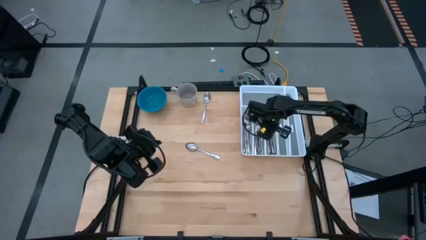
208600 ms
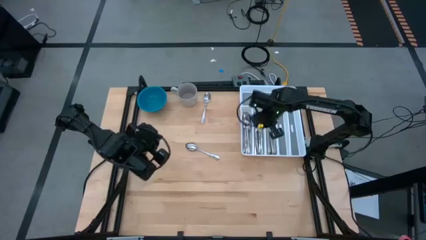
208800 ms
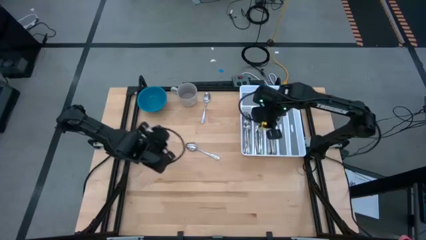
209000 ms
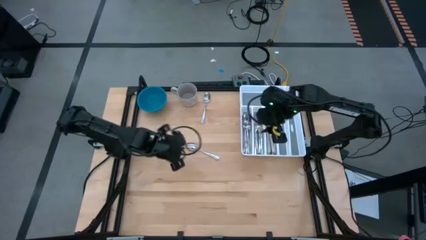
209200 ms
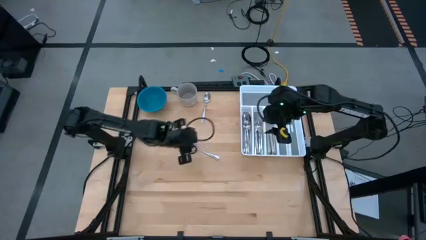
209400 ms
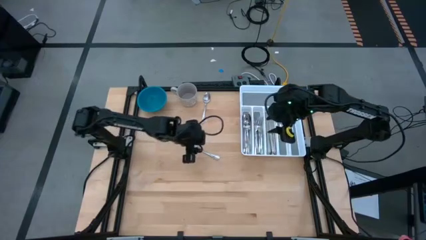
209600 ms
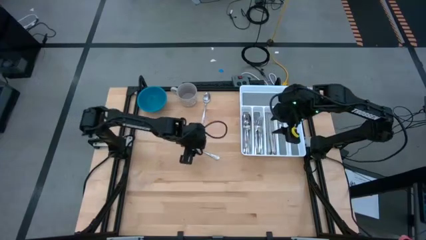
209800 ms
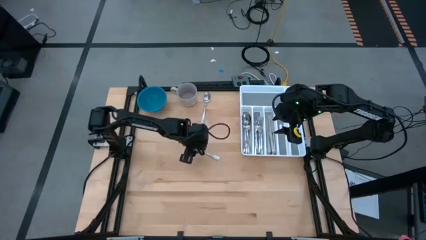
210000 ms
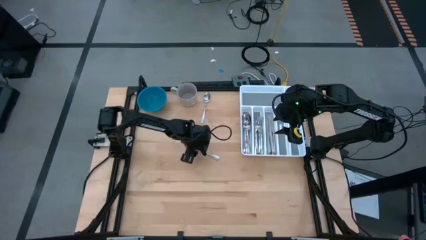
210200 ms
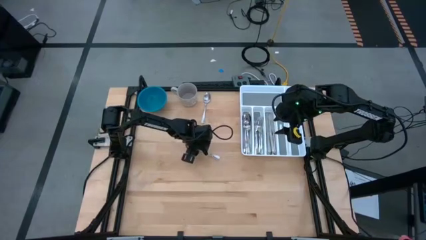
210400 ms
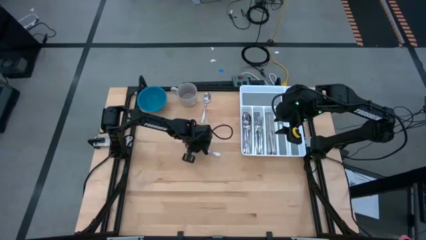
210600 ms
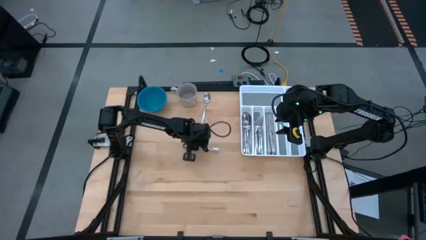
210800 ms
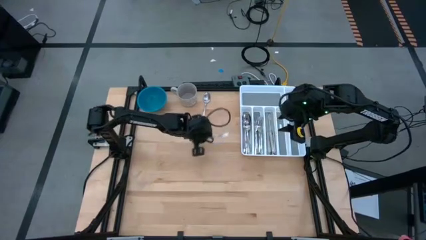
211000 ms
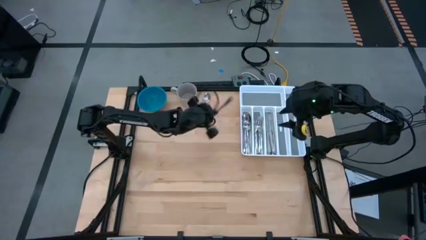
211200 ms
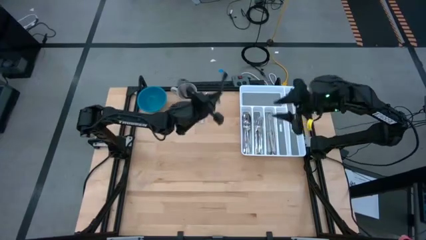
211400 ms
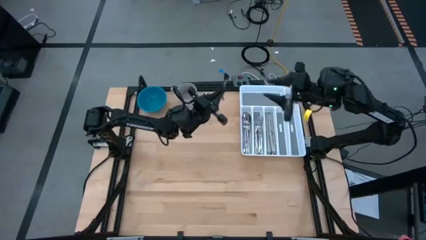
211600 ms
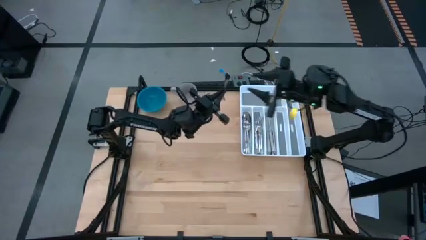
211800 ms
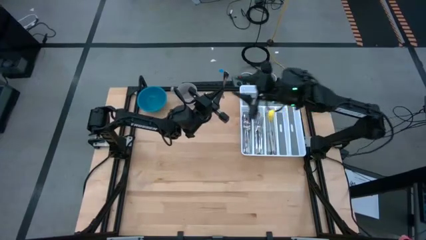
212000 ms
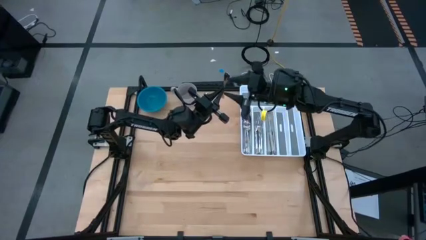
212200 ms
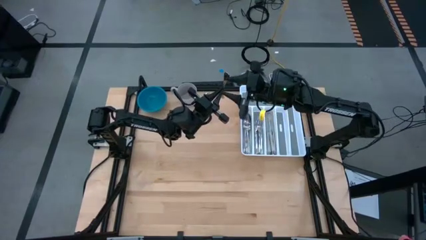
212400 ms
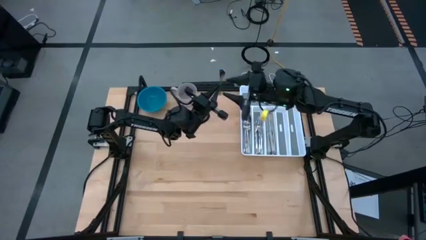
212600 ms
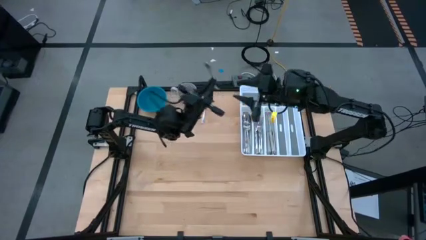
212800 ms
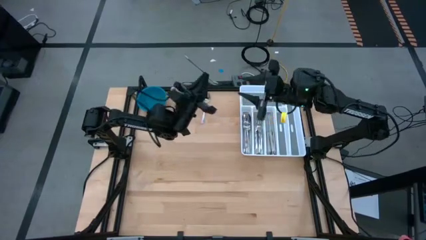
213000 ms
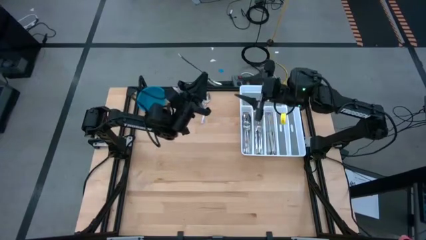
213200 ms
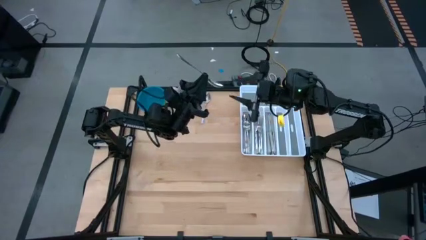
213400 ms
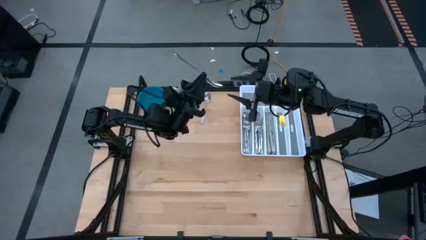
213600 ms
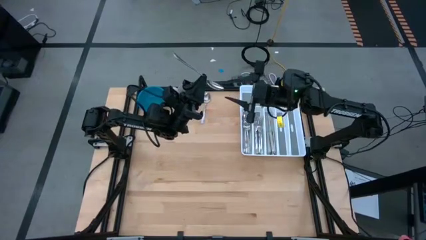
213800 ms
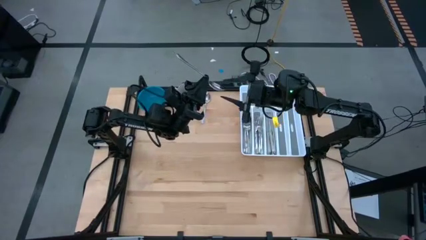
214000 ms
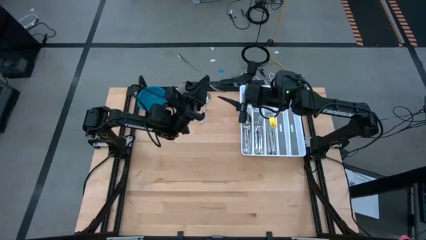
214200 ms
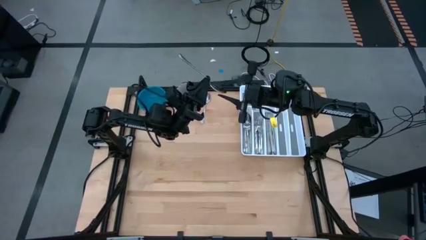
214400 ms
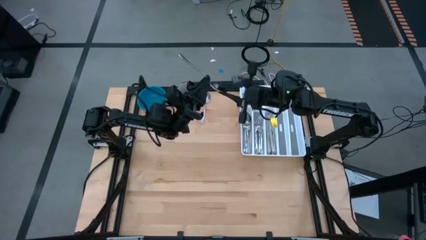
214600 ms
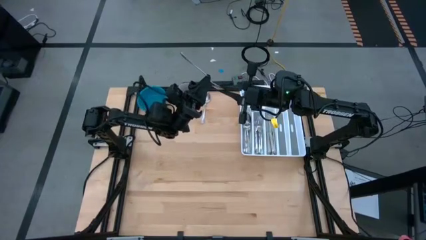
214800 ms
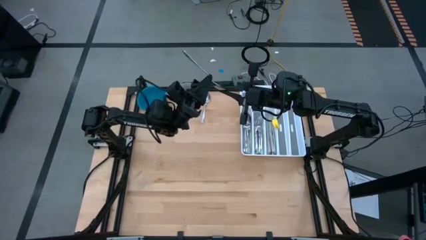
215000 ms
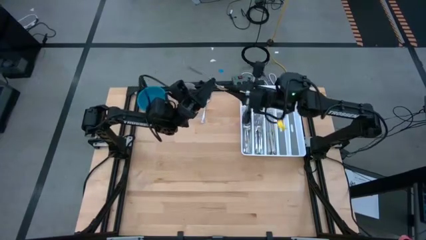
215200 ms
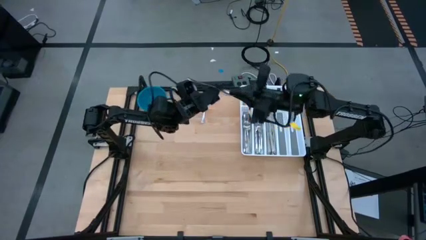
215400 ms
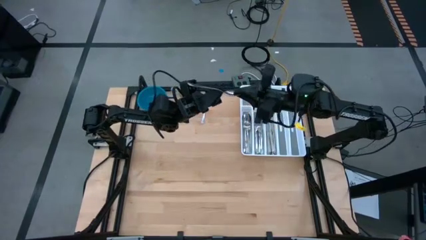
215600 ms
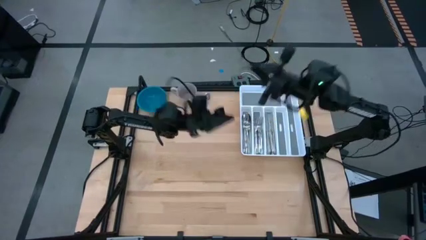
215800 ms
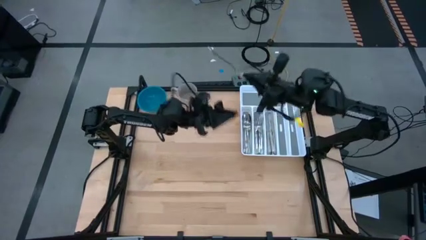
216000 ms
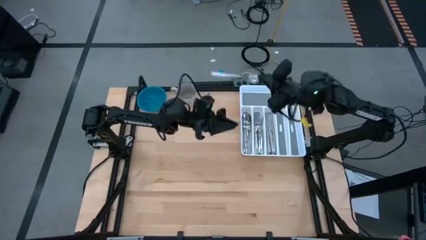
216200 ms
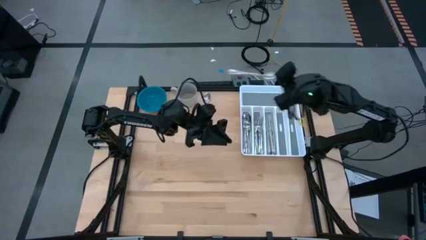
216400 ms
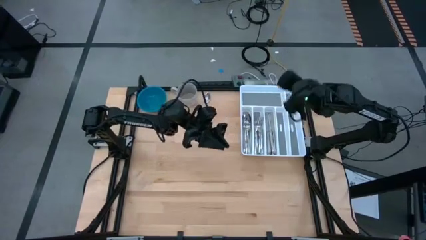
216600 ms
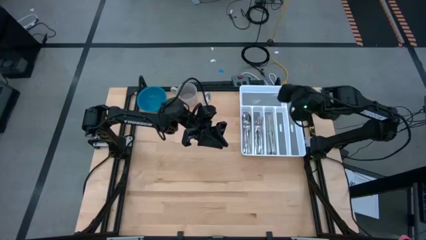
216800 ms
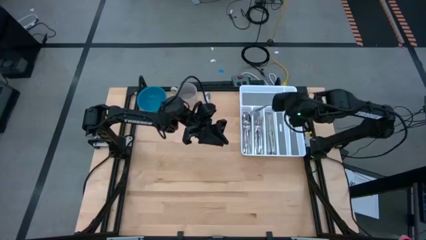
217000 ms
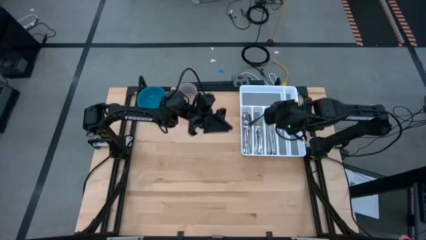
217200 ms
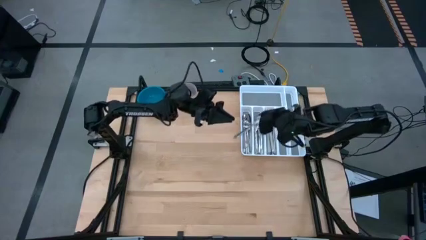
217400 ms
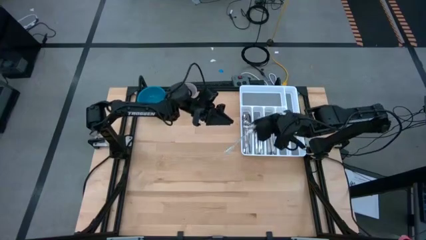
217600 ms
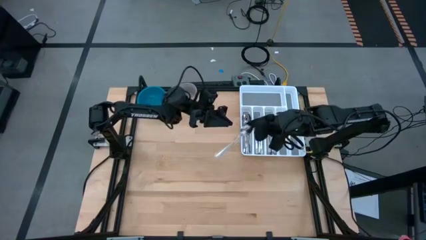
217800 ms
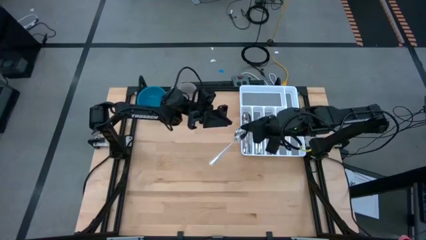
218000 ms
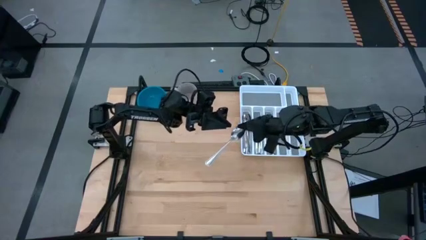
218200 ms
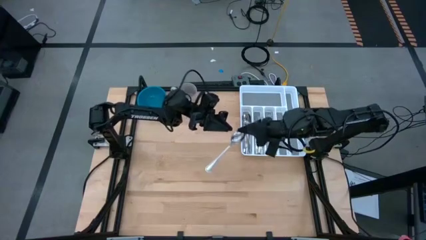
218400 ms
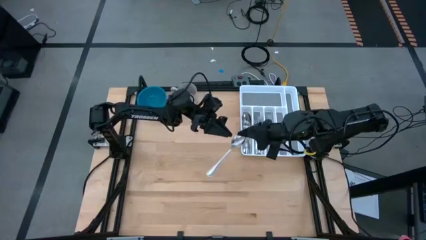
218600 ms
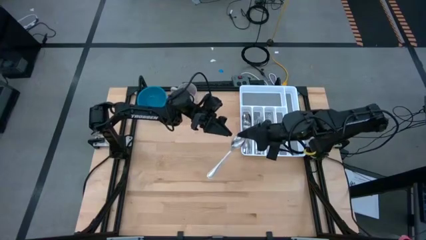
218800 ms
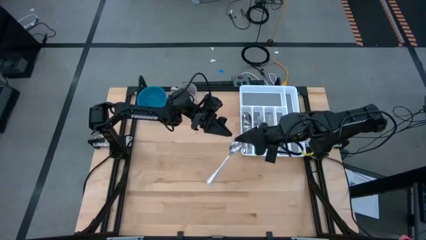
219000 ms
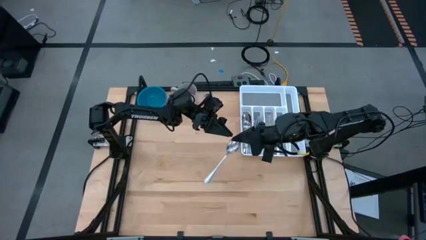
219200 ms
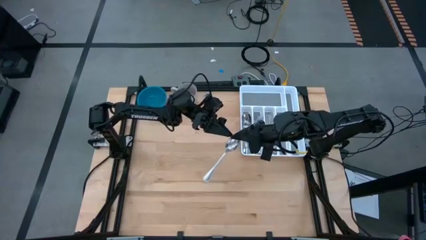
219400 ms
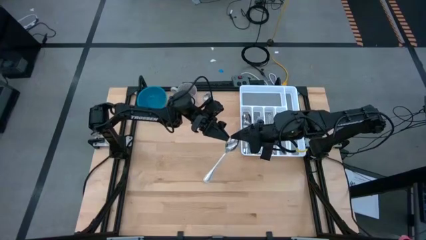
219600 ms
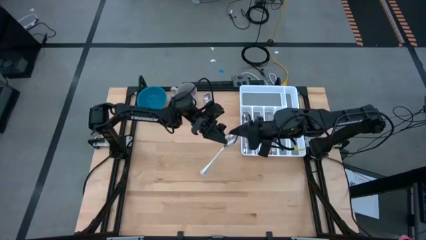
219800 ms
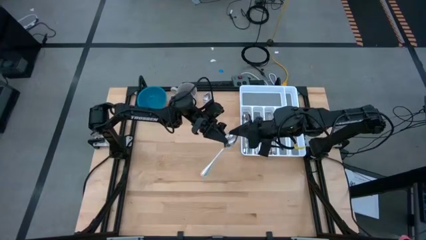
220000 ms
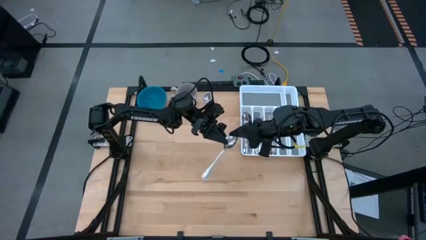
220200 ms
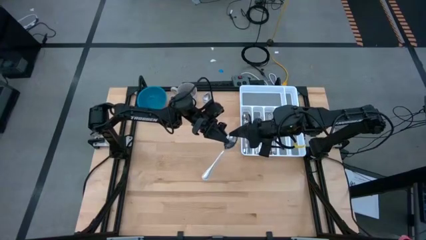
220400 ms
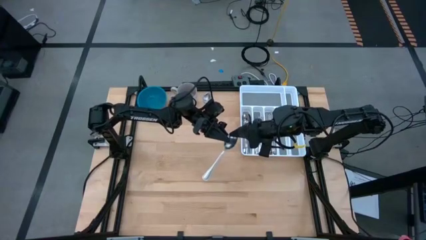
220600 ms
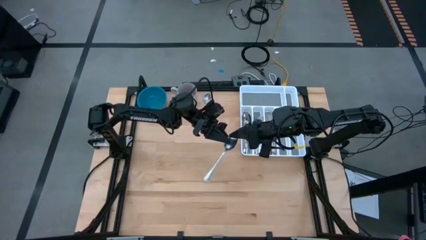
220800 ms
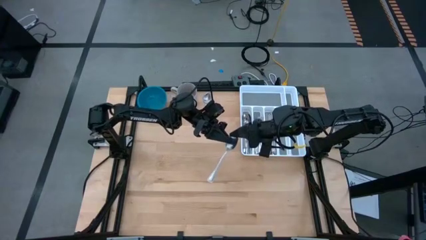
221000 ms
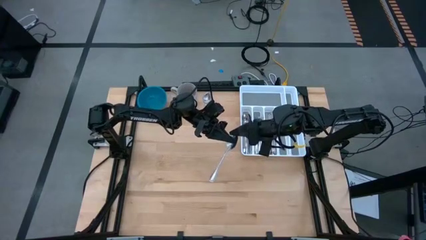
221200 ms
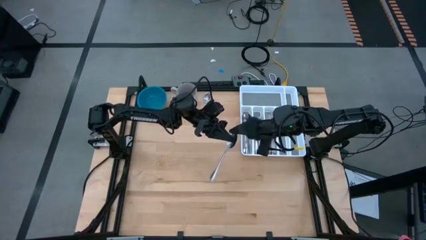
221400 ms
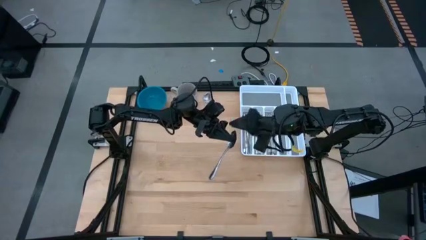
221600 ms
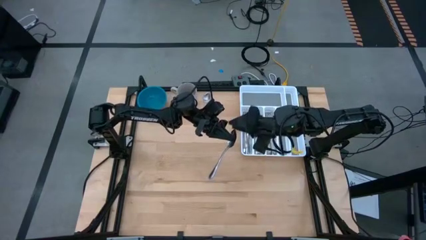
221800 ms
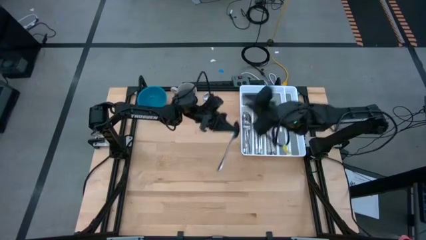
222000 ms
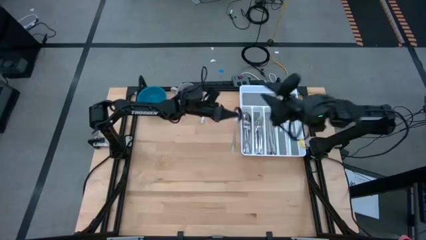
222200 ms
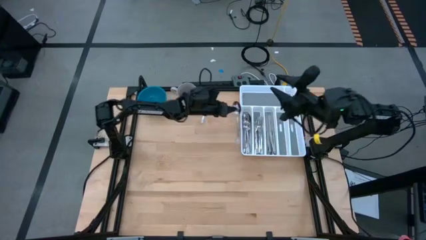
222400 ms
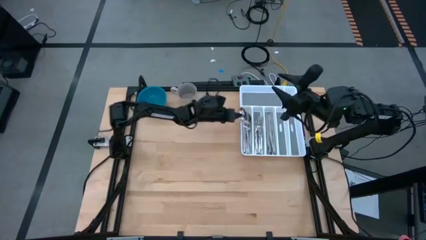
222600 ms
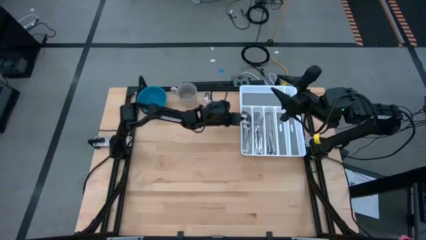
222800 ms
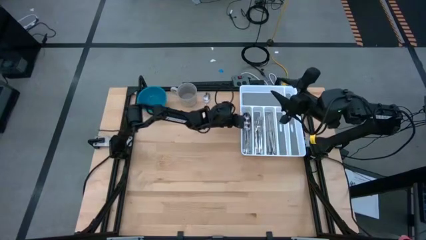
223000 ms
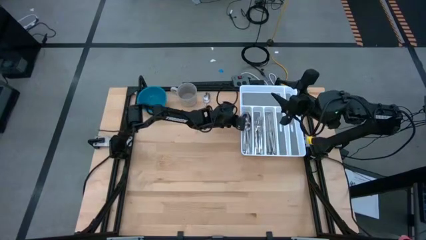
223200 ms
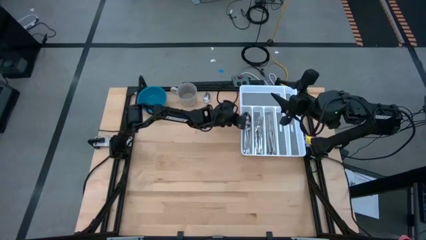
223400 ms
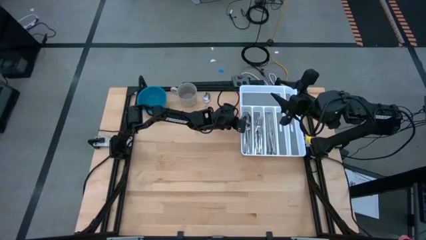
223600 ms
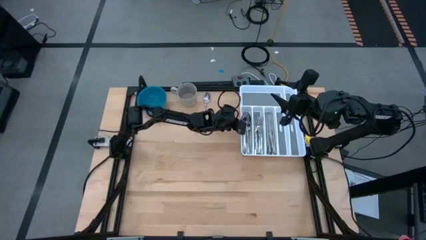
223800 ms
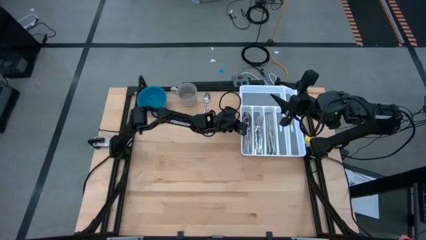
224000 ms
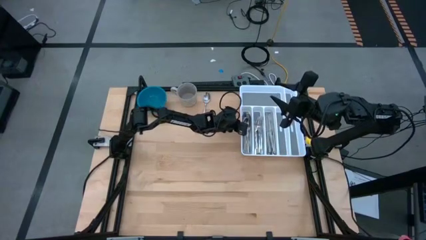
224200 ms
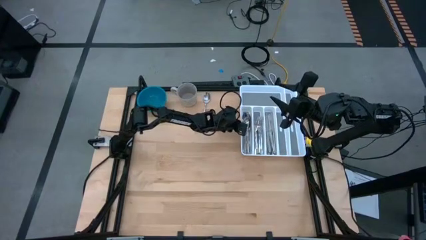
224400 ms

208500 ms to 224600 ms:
Task: Sort silverware
Put the spoon in the silverware tray

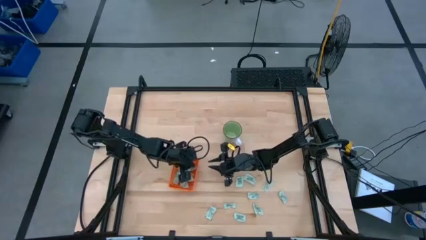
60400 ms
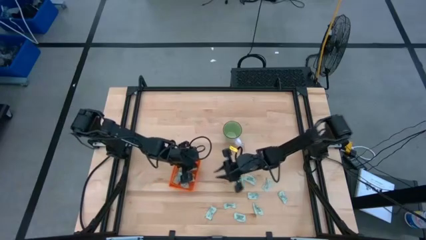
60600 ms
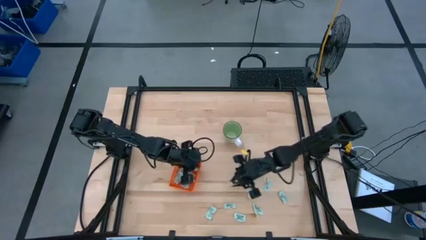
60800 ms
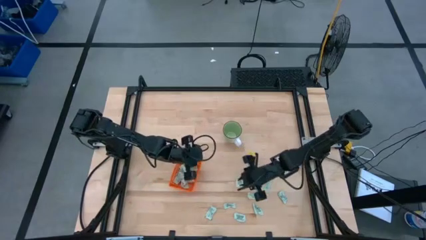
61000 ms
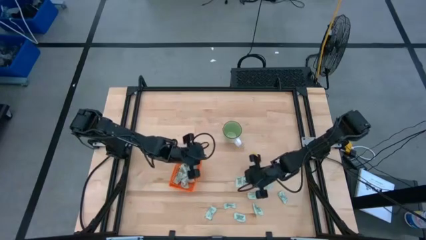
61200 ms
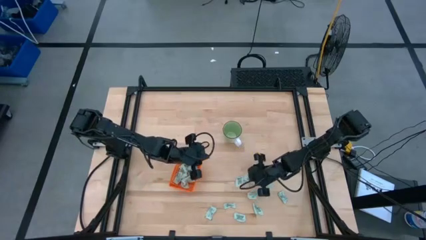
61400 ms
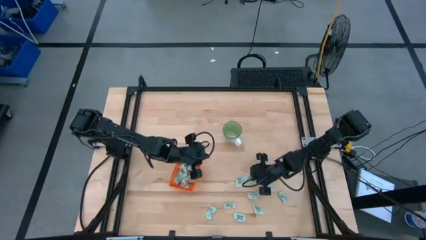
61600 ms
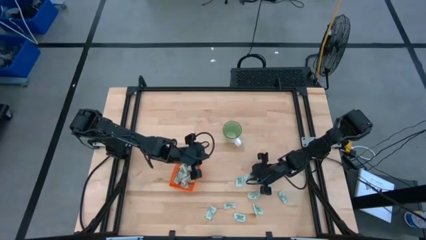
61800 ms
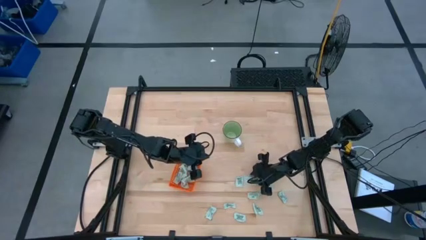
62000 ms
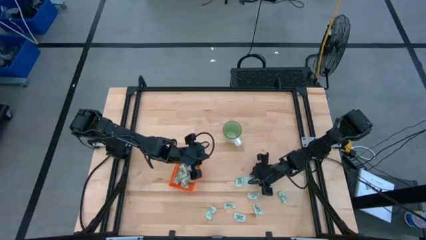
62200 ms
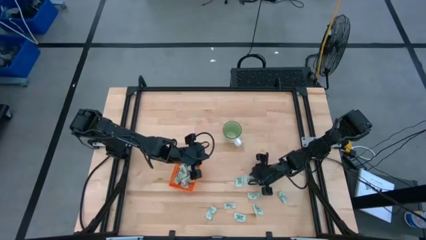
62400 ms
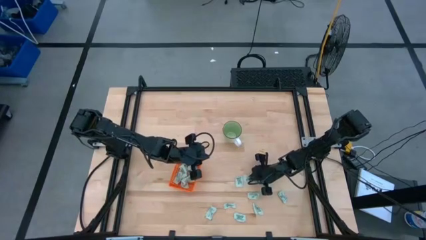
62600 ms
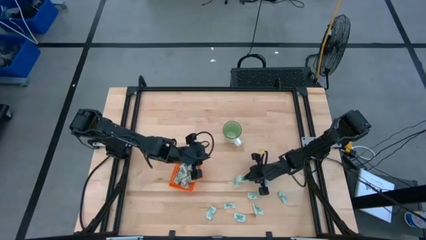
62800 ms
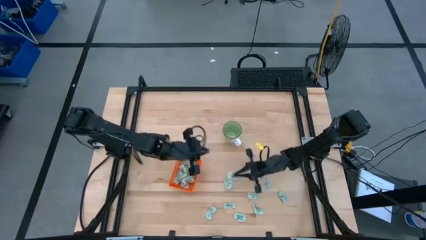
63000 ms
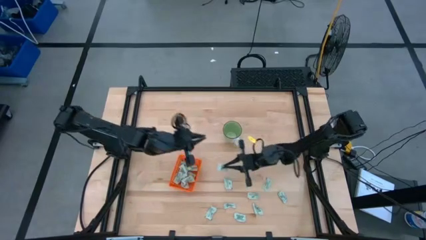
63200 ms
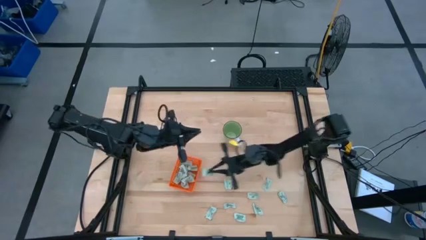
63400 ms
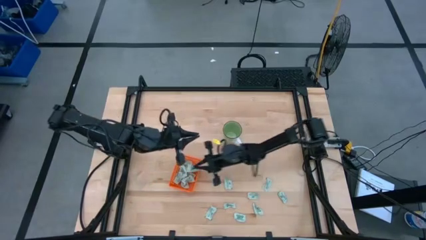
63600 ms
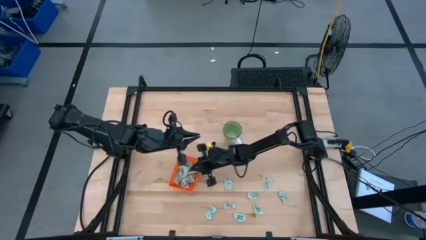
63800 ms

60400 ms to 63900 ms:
Task: Pick and place Stevia / Truvia into bins
Put the light green stevia packet into the orange basket
